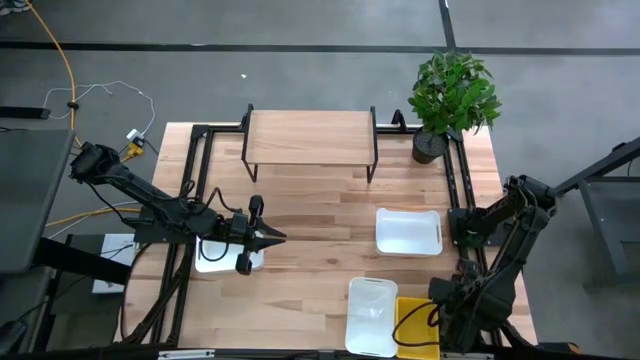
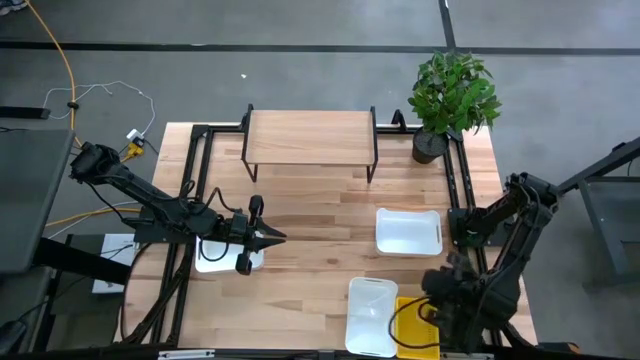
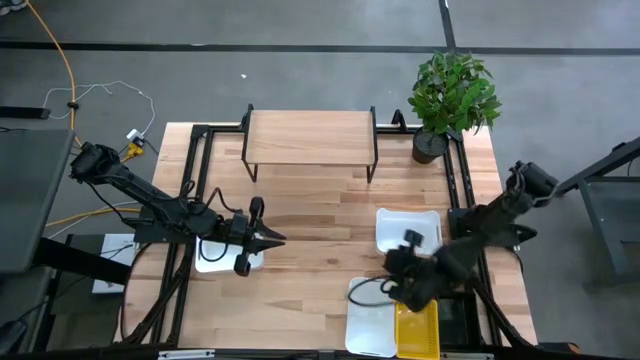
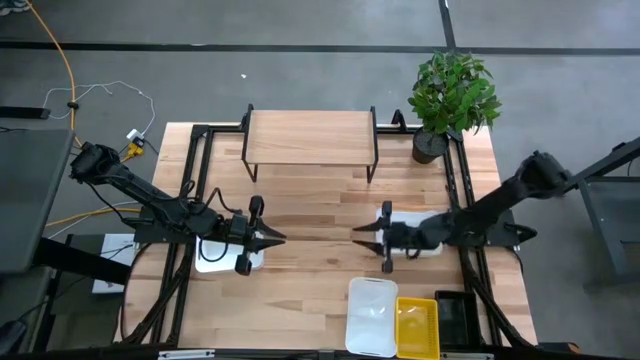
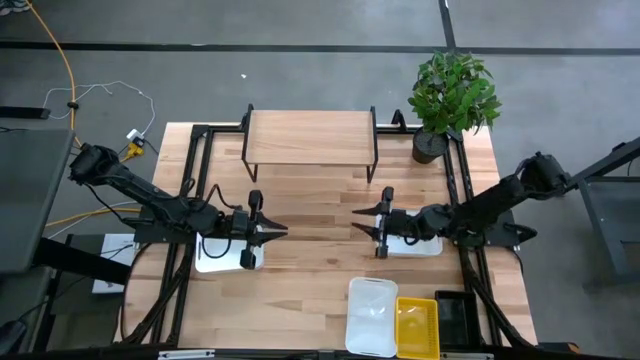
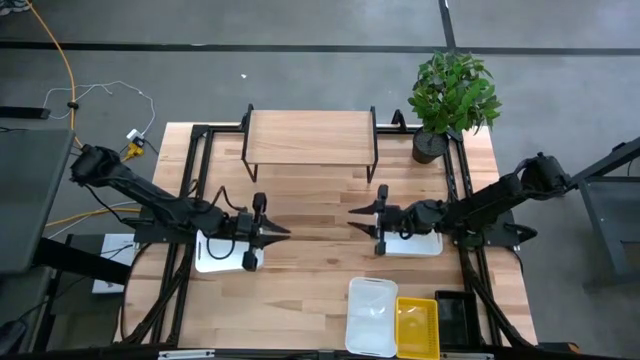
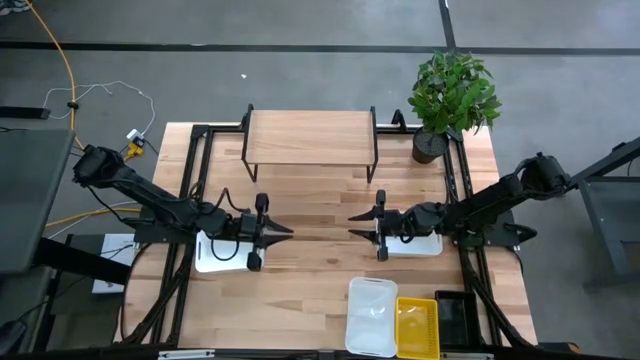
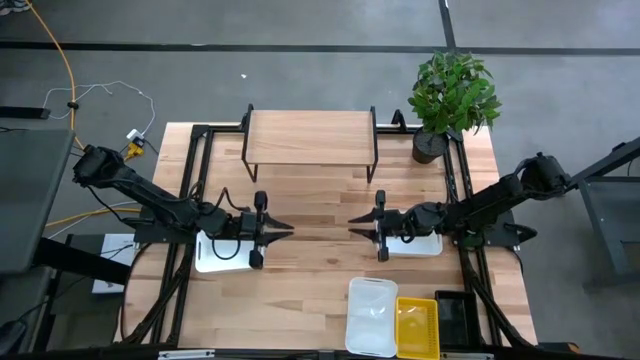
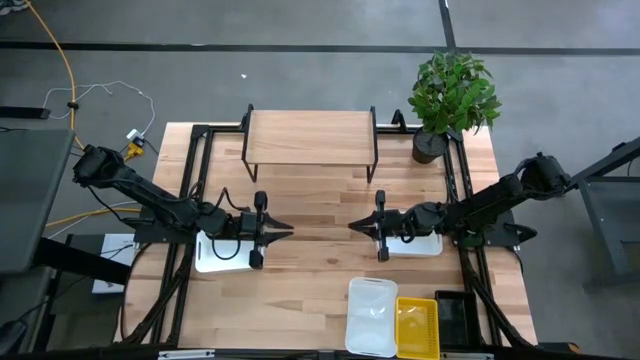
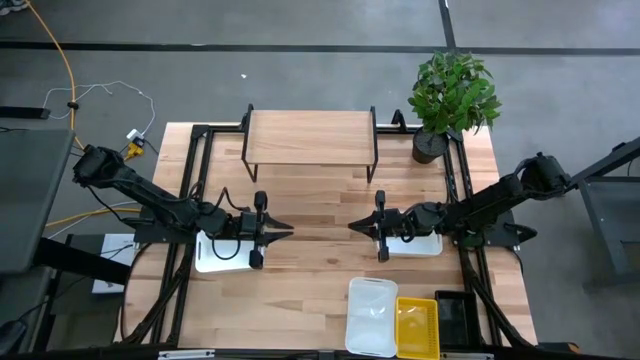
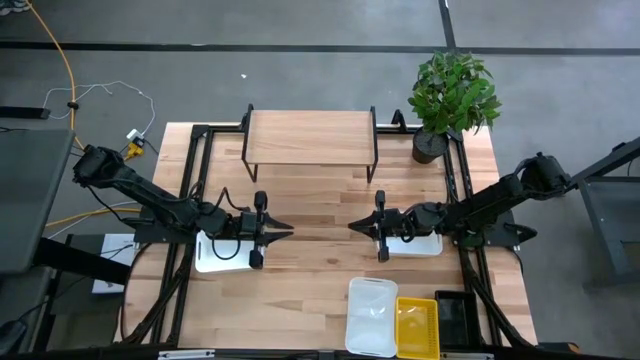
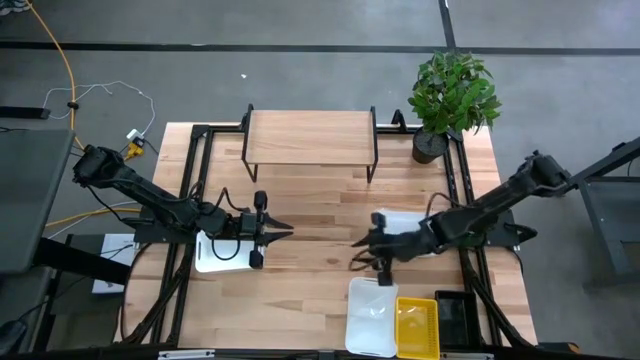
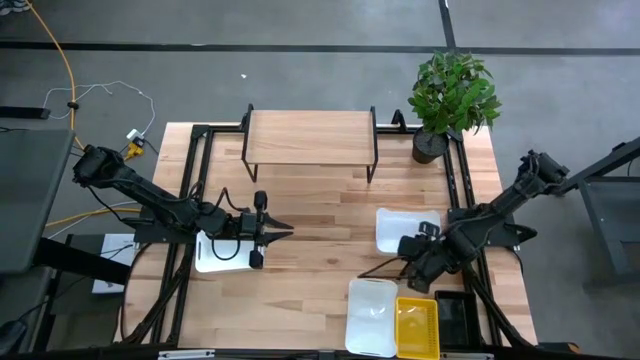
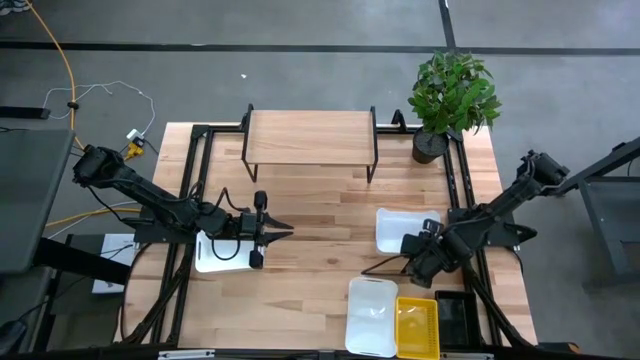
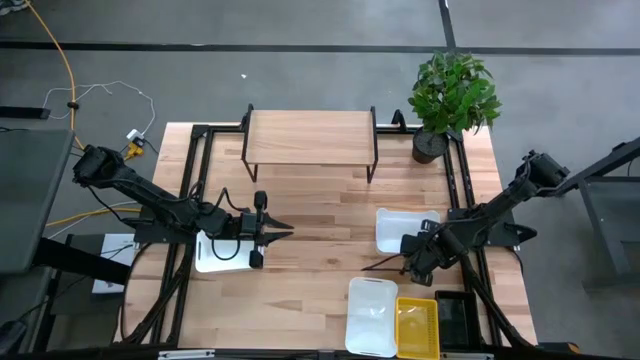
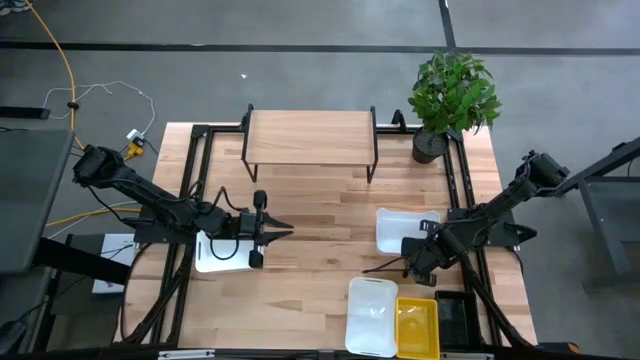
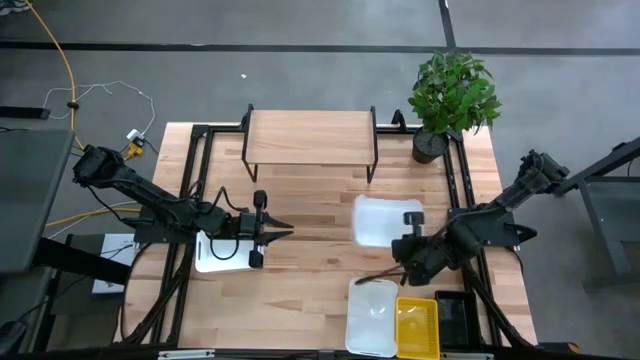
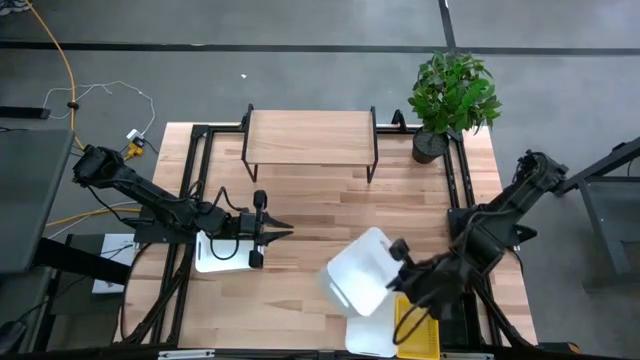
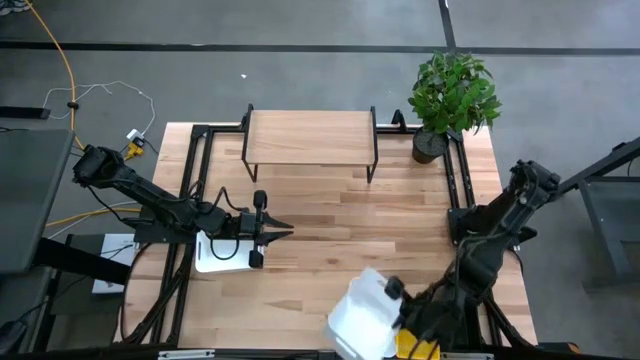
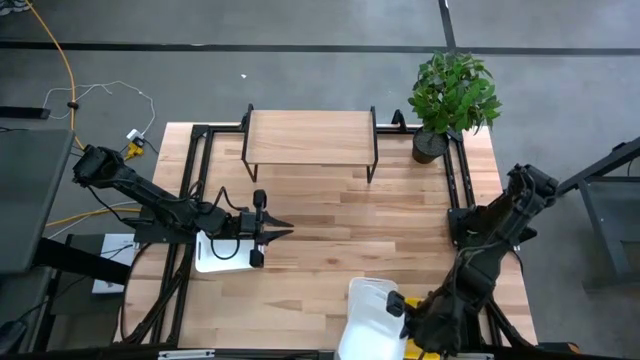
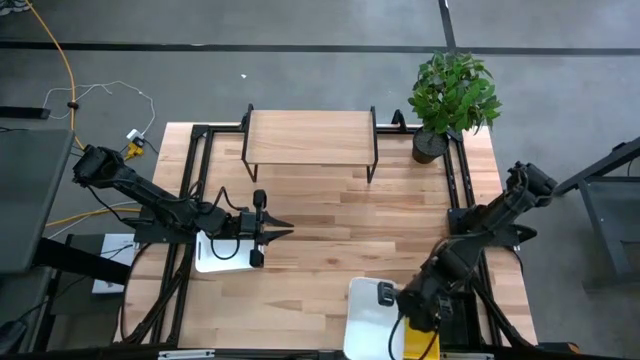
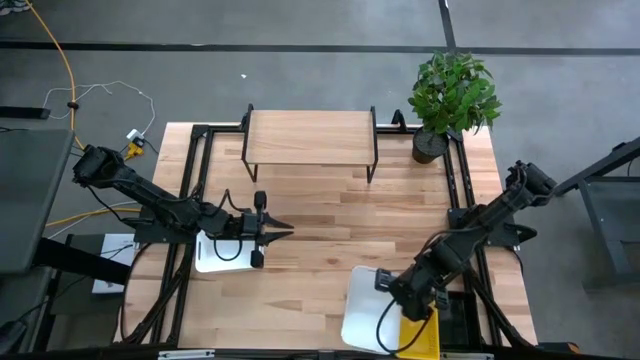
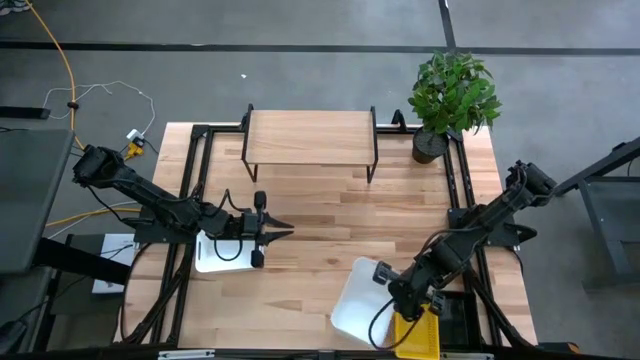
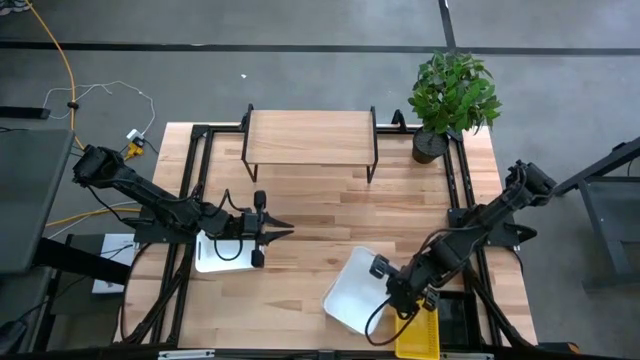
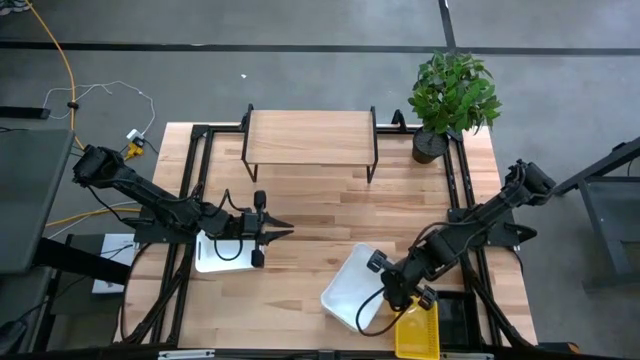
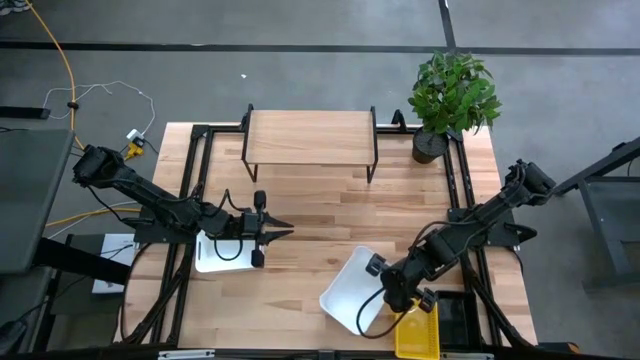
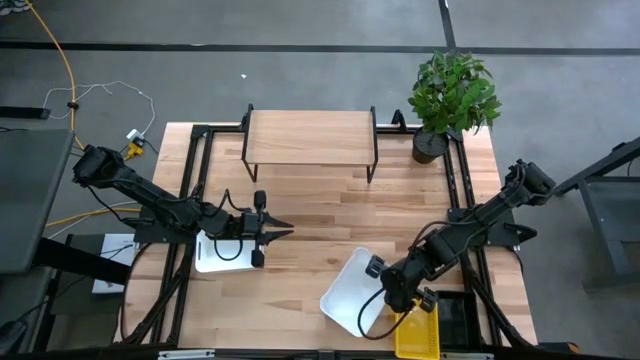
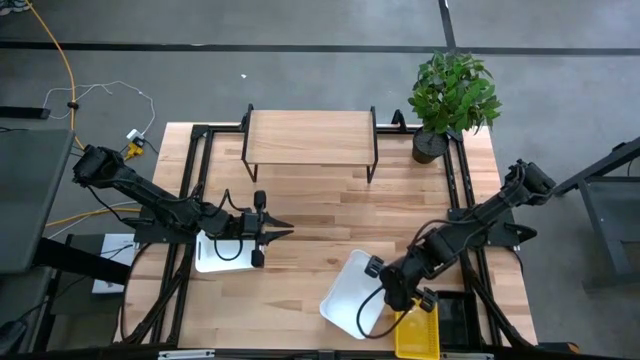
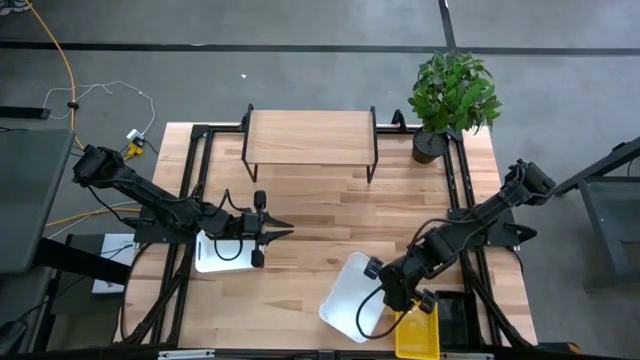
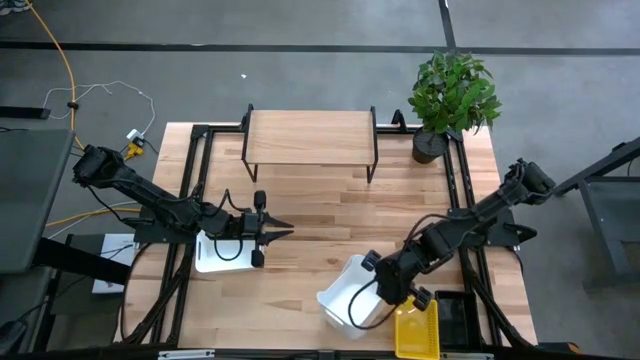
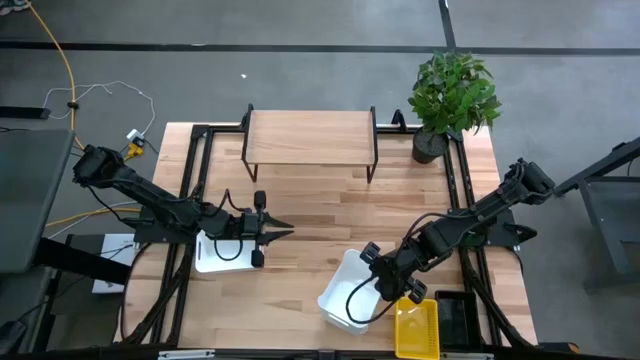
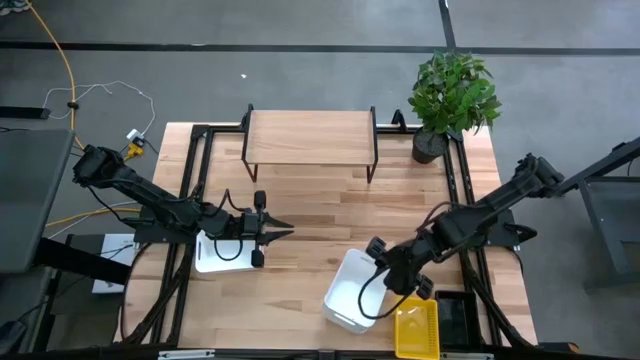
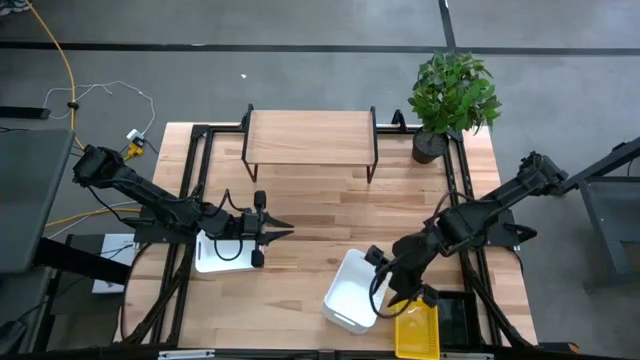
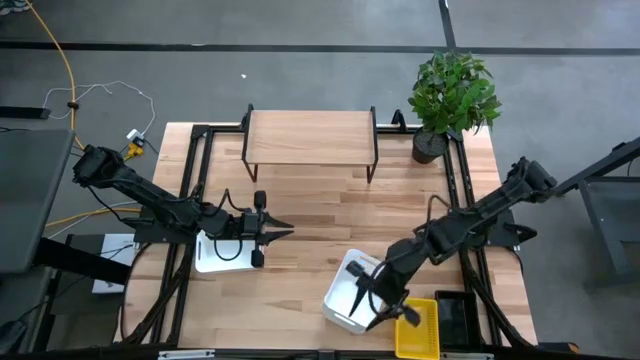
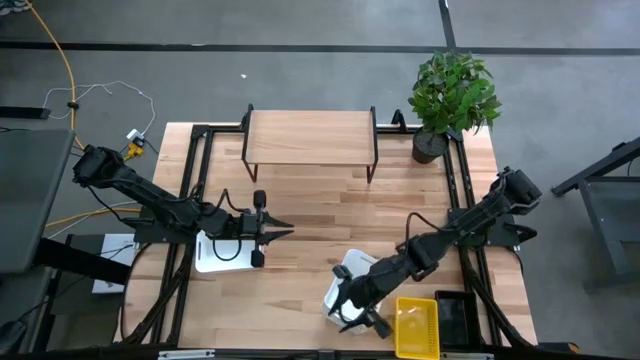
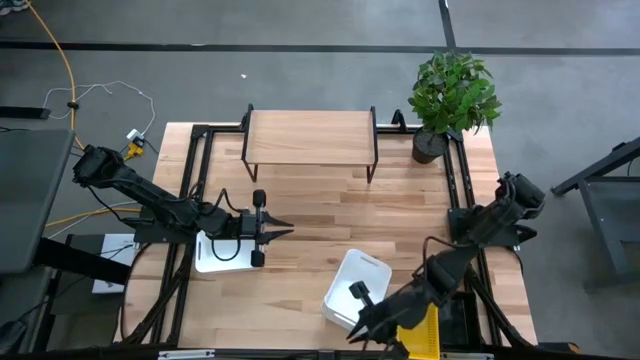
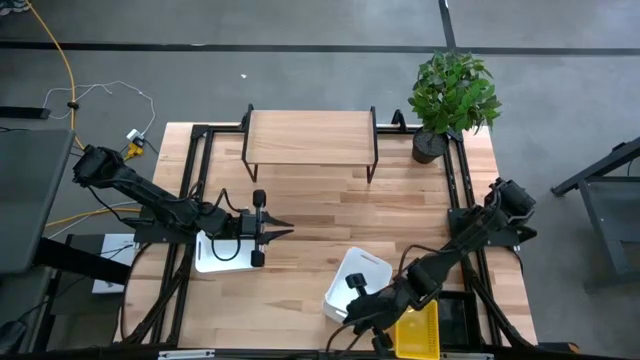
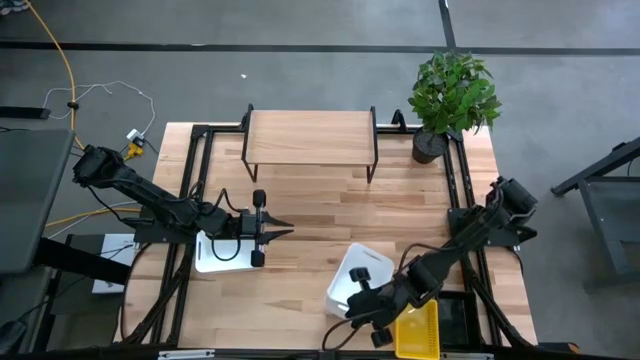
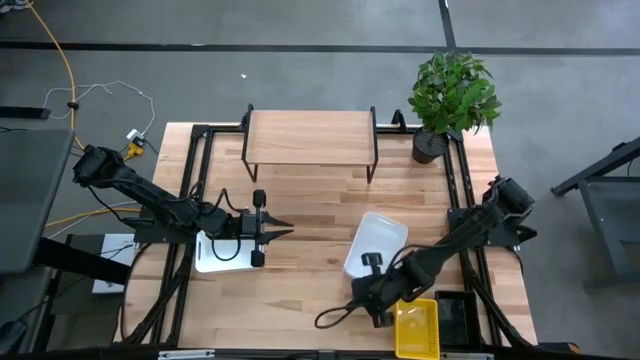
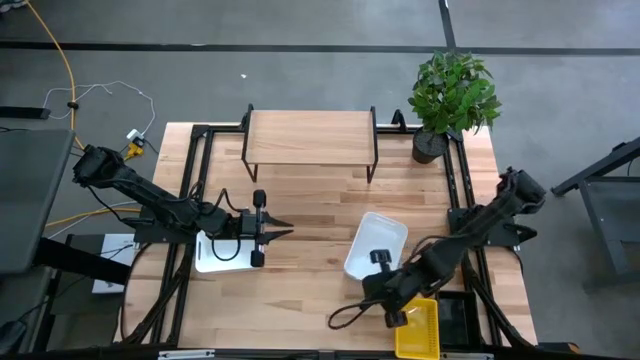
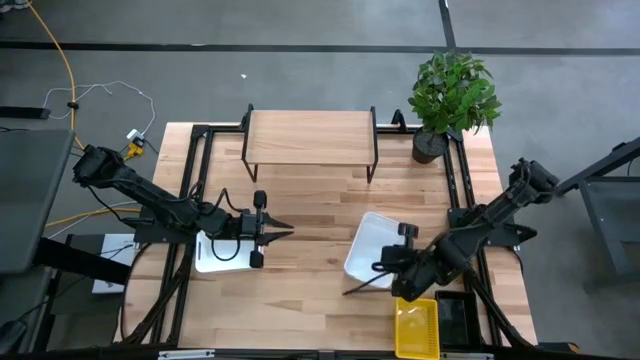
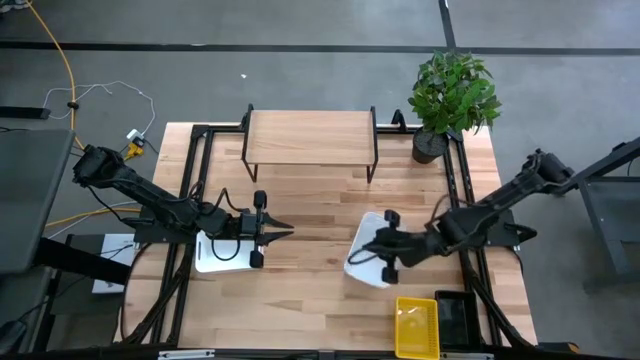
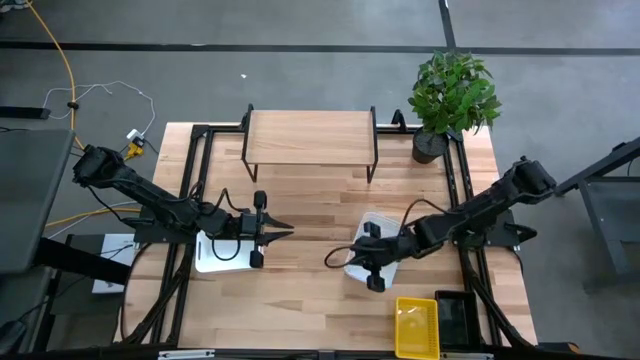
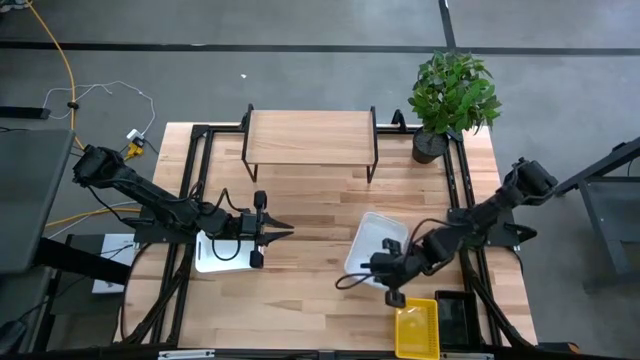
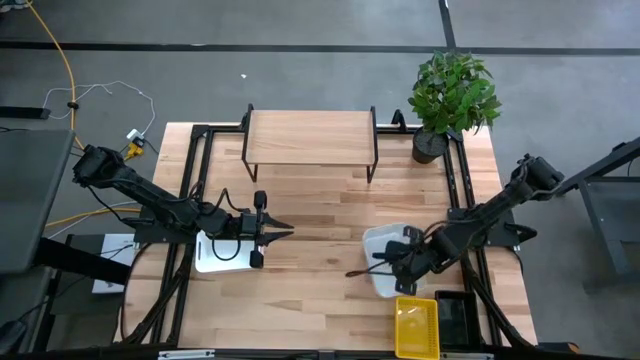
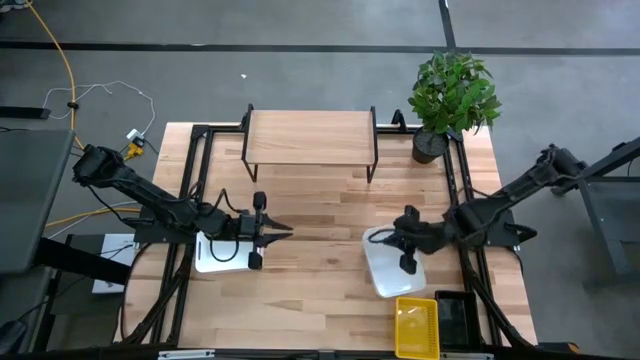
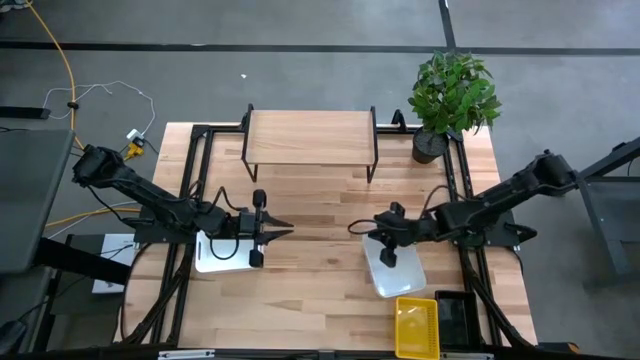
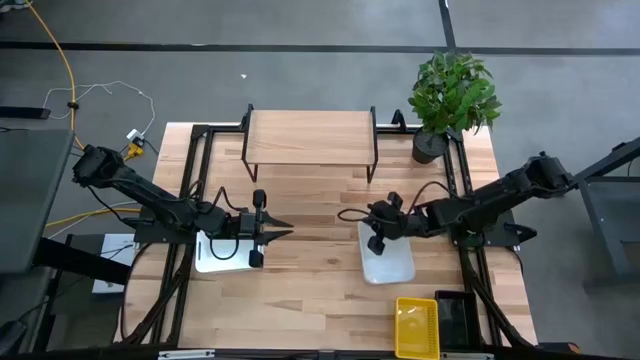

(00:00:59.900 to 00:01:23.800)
Task: Stack baskets on shelf by color
Stack the top right white bin on the bottom white bin
